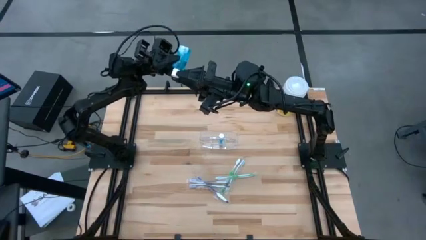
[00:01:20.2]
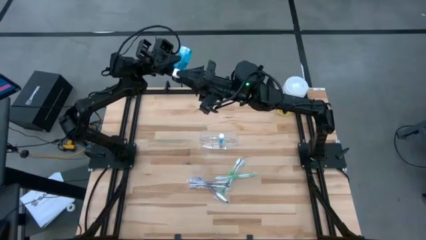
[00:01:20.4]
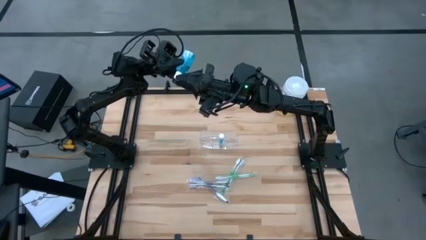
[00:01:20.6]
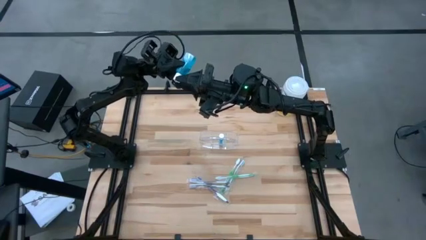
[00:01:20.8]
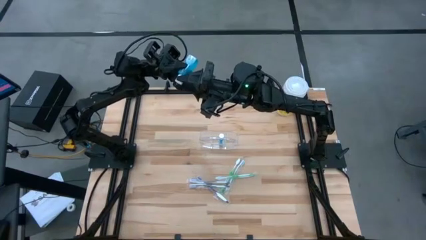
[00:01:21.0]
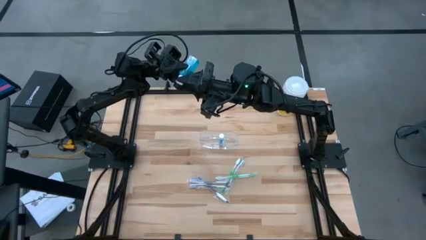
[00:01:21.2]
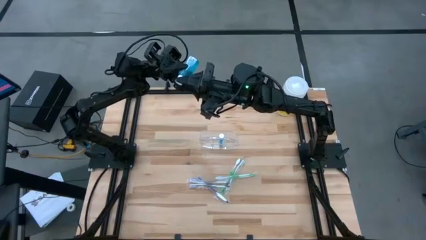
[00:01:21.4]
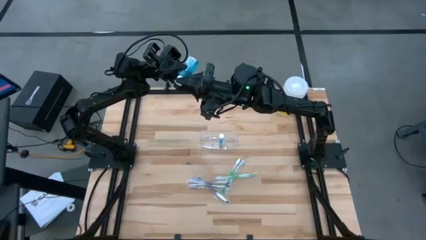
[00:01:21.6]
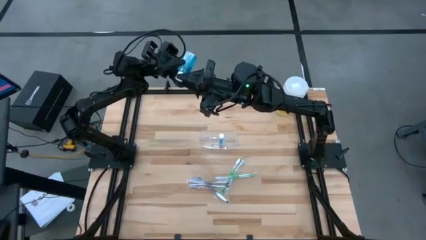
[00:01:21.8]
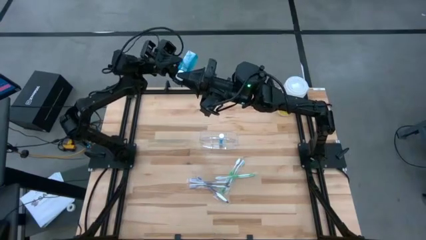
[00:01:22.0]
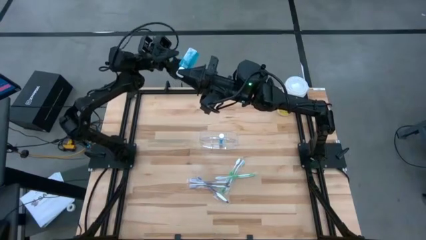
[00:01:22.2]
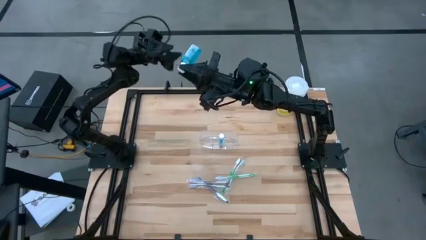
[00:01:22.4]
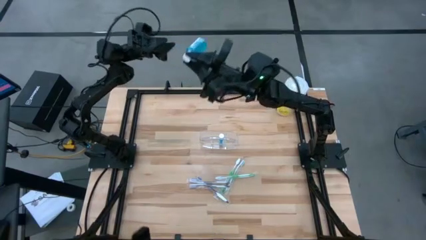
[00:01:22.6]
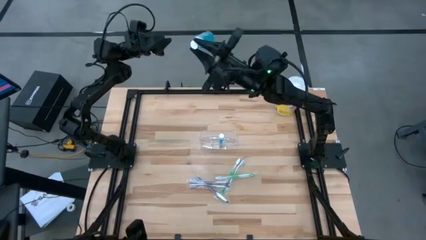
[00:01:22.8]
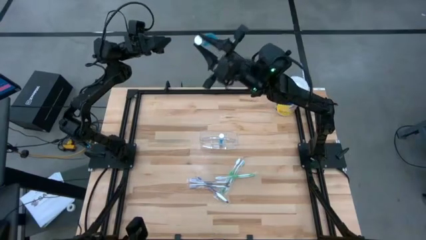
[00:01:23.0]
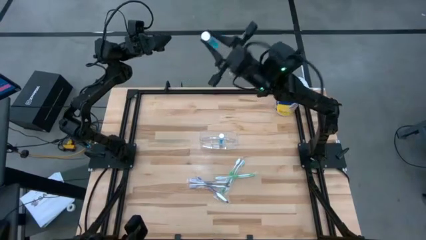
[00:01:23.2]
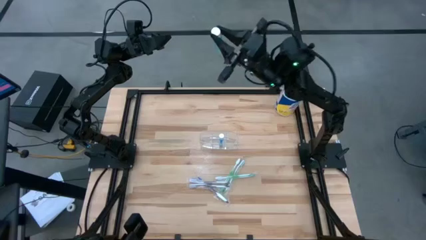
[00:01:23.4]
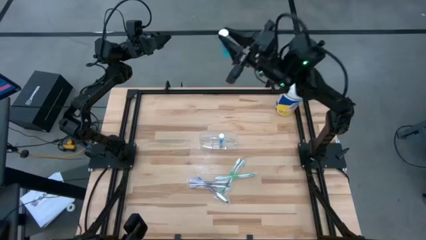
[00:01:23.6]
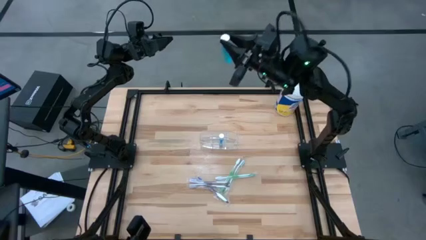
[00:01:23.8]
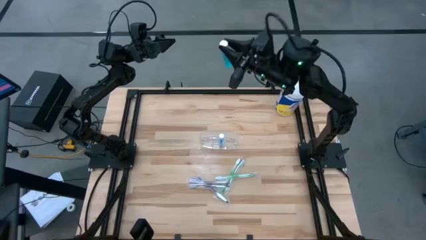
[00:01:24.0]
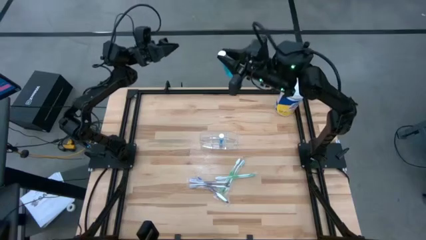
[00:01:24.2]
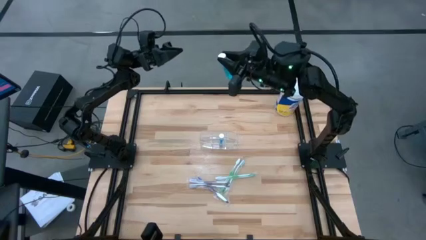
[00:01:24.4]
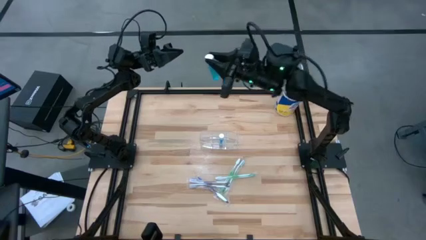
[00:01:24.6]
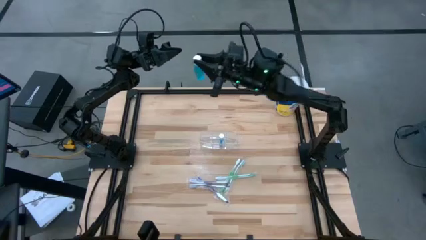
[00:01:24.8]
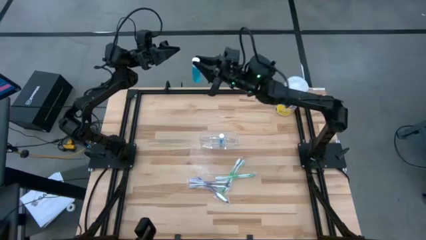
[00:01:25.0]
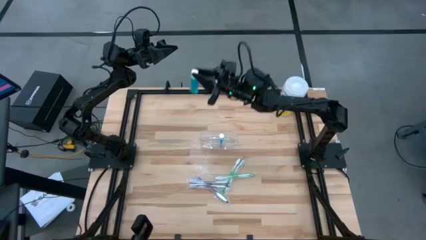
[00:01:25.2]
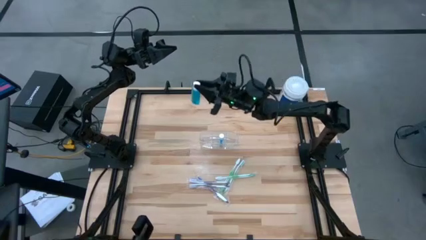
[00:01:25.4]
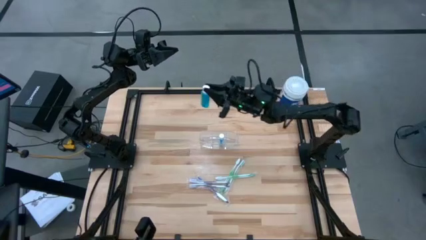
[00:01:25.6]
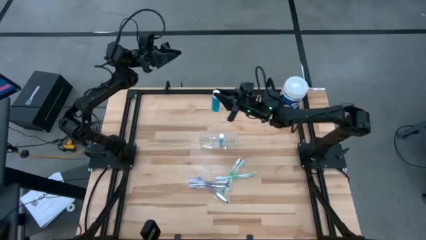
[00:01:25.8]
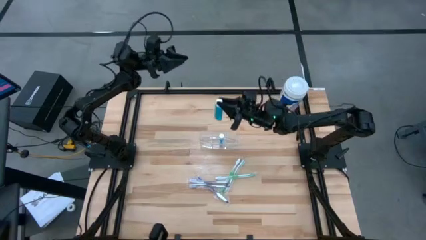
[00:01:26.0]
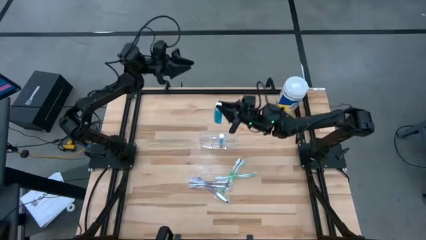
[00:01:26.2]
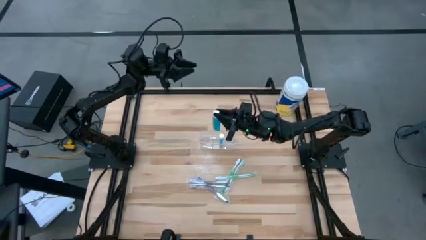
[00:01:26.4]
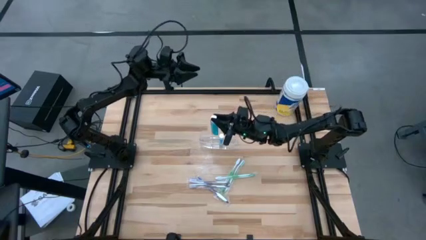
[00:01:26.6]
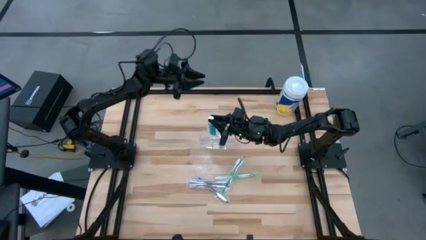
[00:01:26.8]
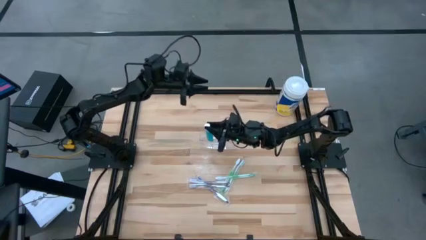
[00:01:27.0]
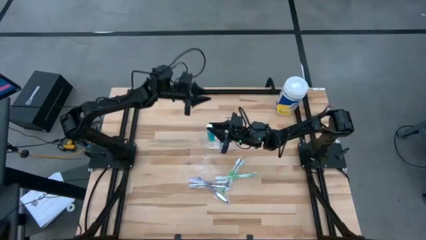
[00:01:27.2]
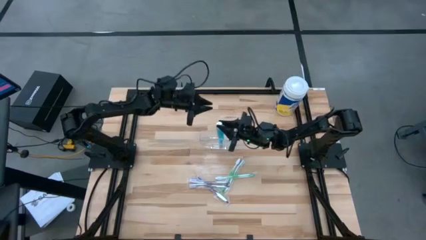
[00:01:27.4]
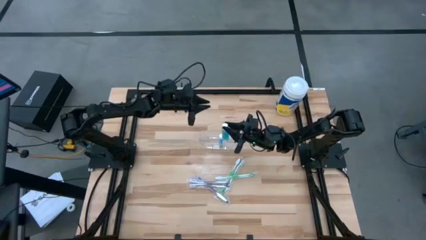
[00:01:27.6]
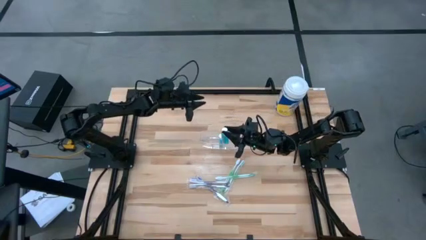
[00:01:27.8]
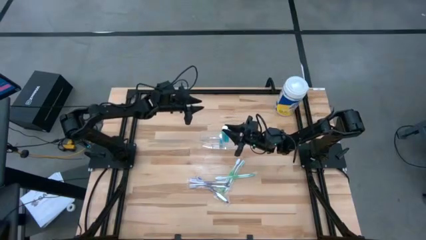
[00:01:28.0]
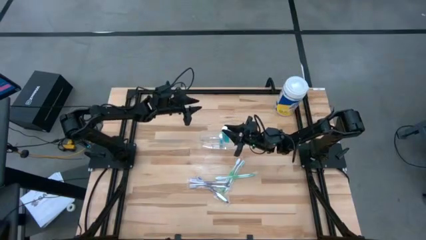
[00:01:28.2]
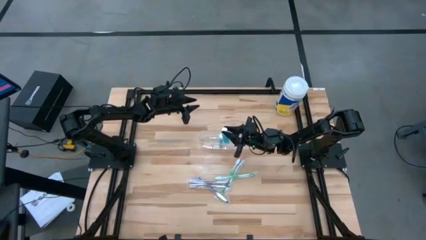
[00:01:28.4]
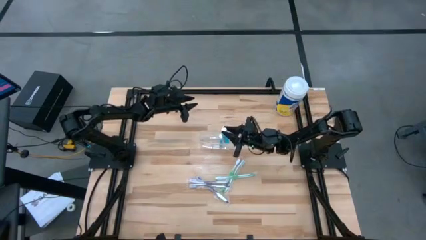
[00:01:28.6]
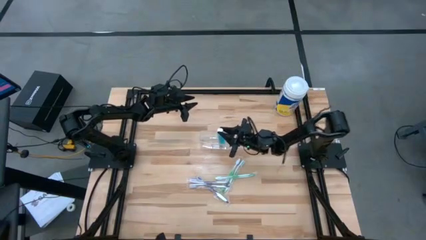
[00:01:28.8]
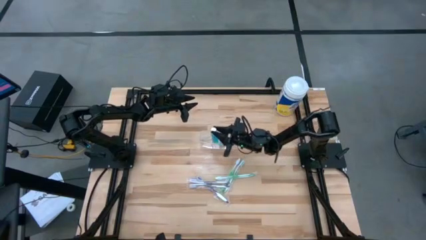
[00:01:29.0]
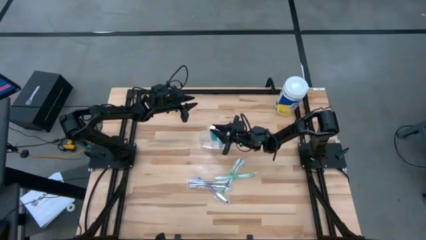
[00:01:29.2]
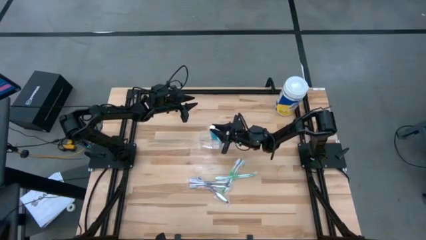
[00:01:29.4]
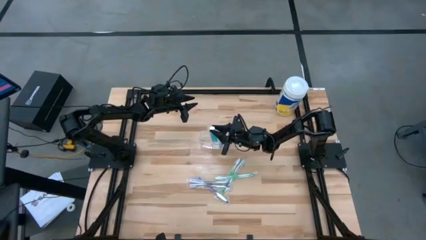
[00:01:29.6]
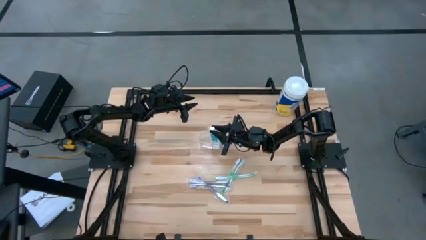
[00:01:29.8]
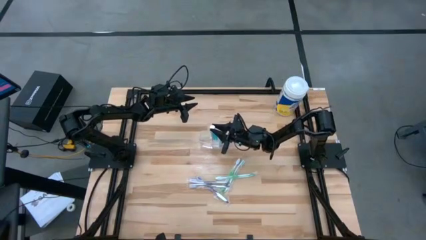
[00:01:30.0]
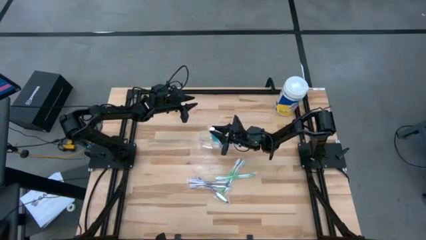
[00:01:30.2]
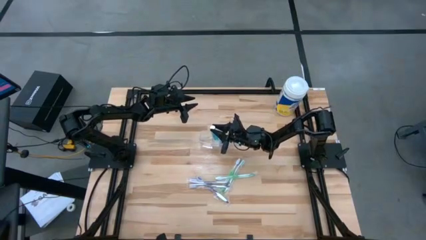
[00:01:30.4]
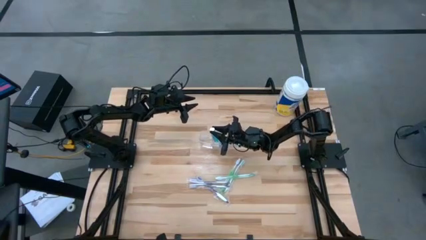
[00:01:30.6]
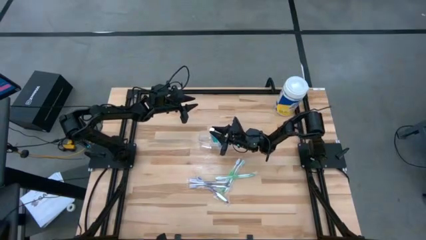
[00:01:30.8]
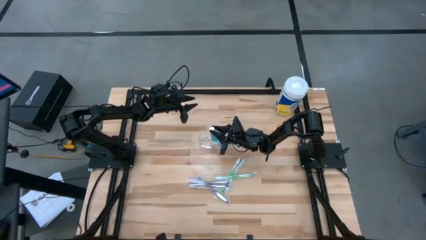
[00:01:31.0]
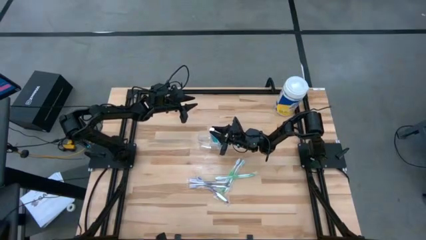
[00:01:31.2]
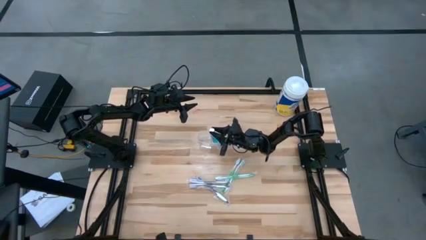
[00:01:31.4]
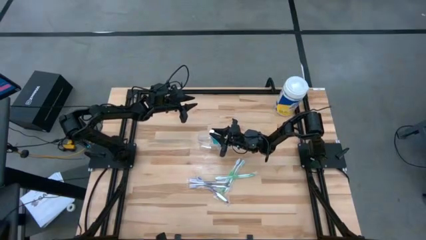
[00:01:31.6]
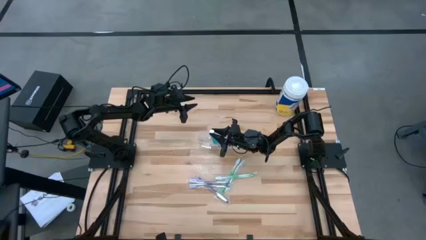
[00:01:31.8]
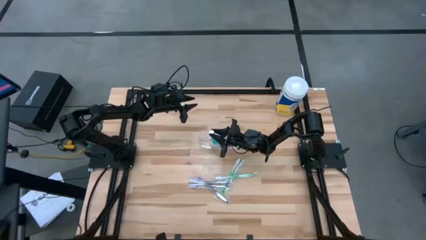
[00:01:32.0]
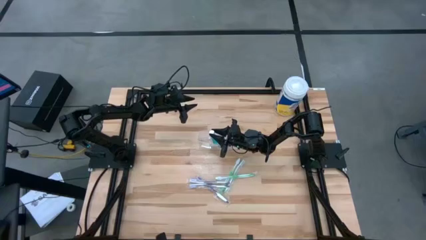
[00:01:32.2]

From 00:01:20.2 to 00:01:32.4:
Task: Pick & Place toothbrushing station
Put the blue mouthwash bottle into the transparent organizer

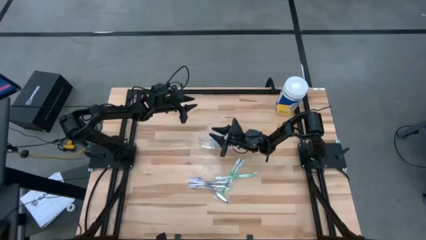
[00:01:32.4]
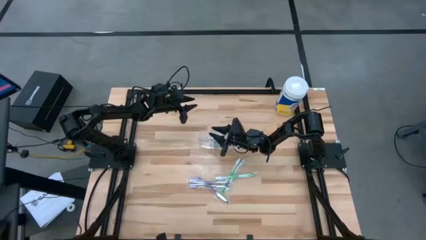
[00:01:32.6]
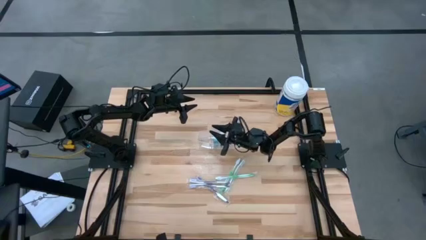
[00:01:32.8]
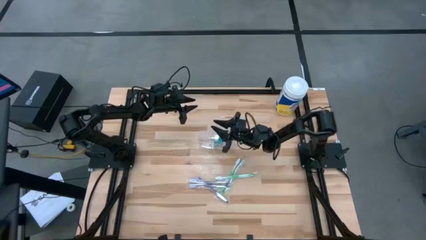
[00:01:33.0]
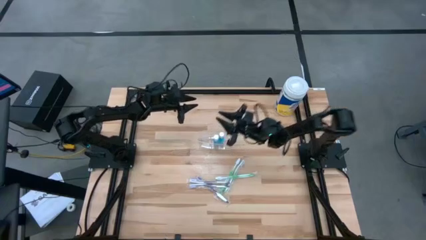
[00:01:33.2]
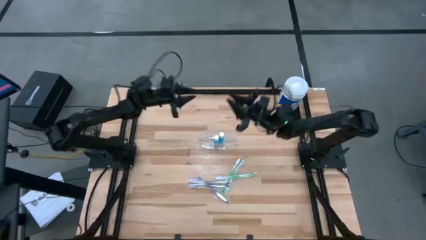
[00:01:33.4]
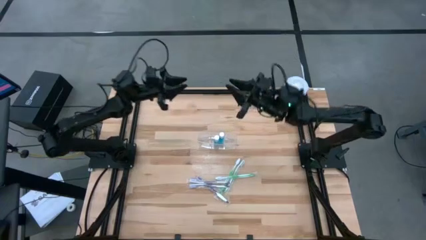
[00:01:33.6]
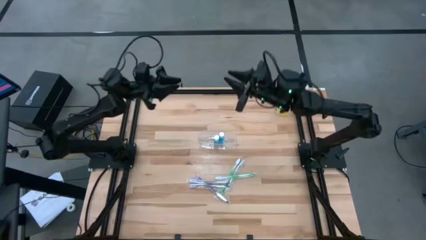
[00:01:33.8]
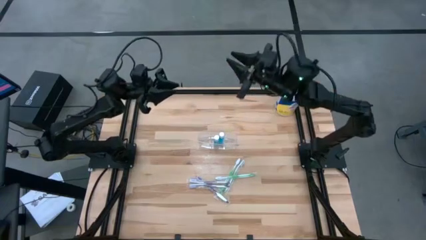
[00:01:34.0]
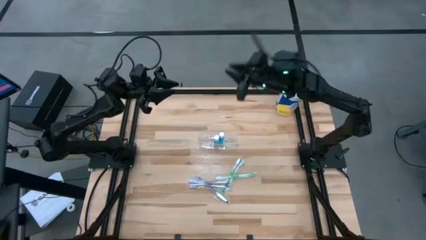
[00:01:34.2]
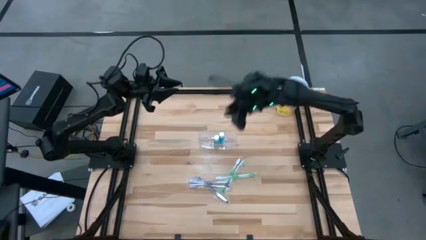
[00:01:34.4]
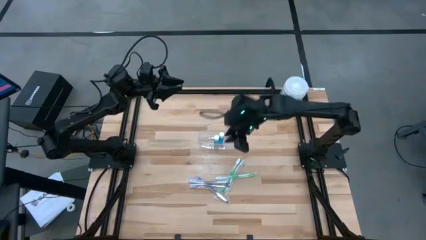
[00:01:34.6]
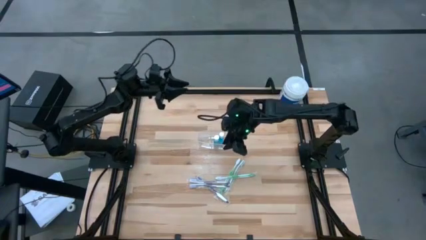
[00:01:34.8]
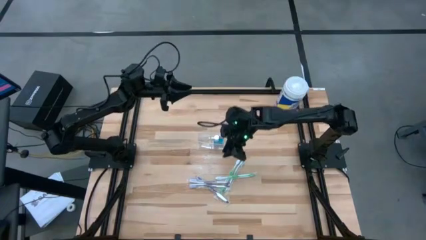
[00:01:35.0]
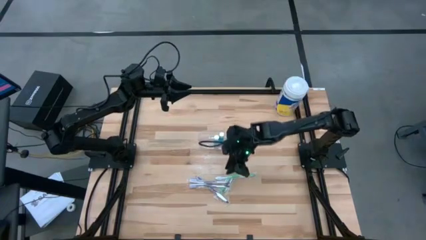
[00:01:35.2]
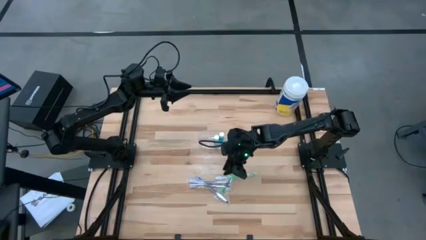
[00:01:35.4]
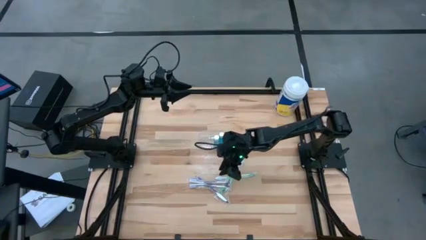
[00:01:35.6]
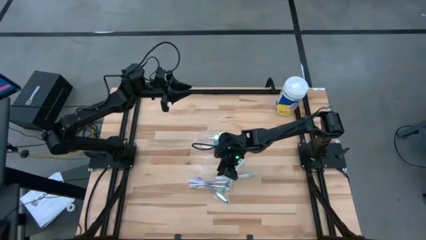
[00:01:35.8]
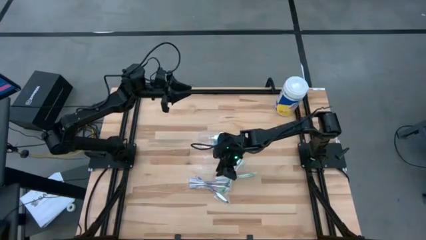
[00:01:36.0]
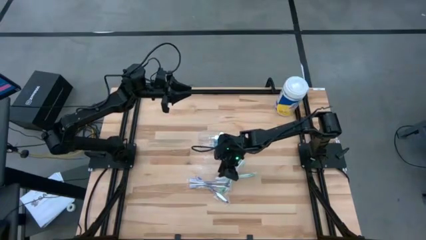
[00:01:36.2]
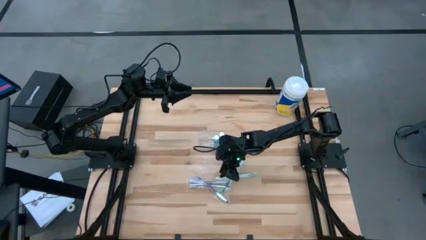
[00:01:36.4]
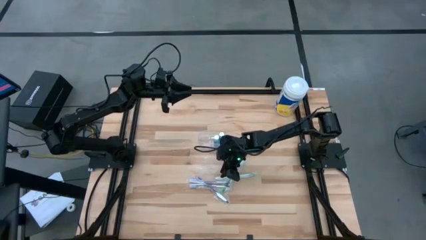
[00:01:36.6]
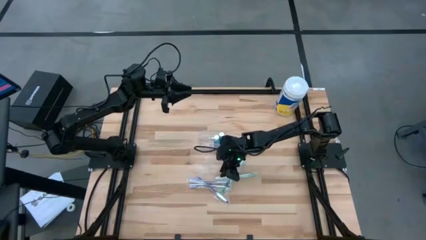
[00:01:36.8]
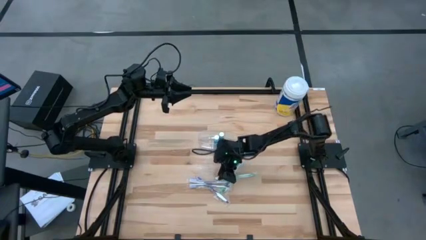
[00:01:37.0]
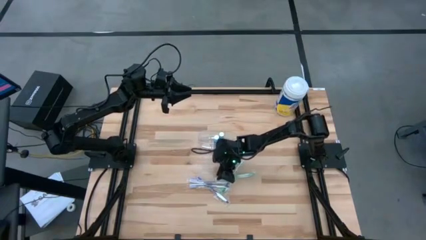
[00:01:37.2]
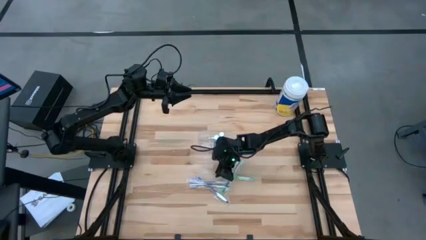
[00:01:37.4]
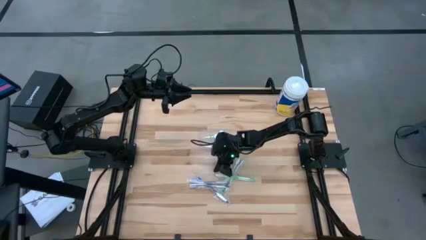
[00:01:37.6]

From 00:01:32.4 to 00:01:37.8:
Put the bottom green toothbrush into the transparent organizer
